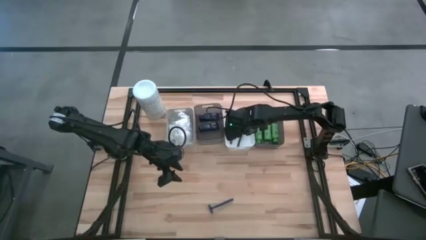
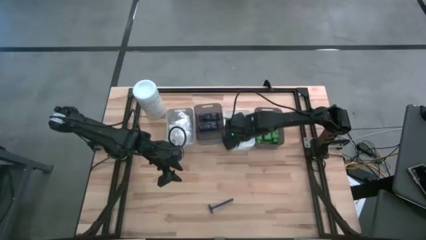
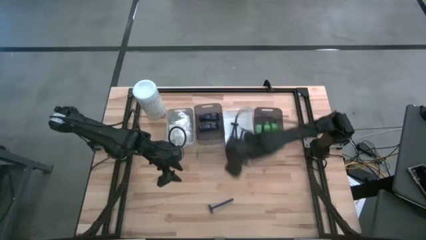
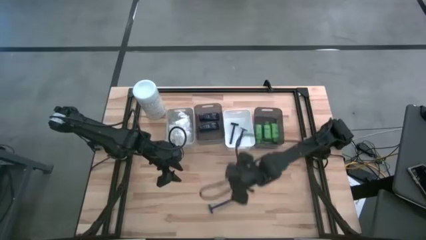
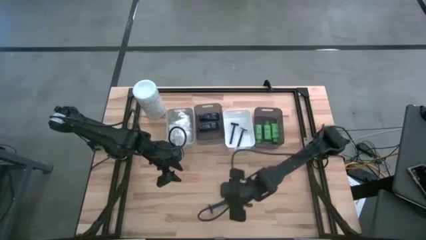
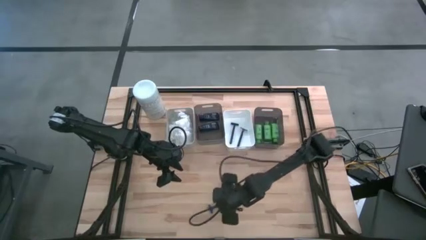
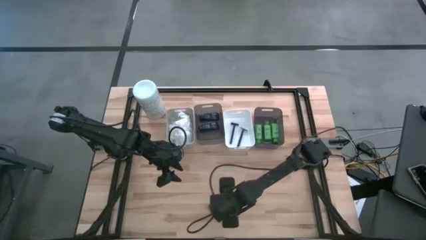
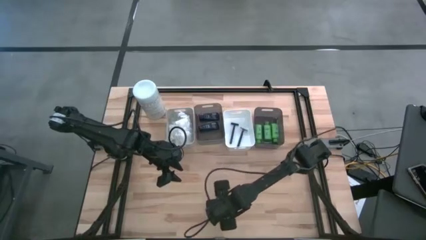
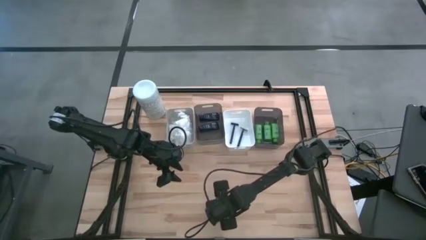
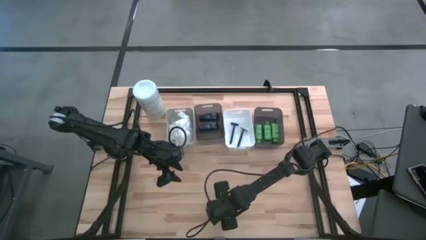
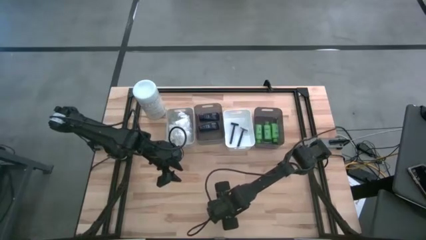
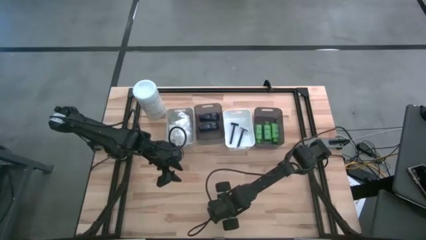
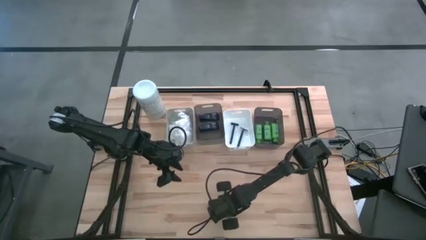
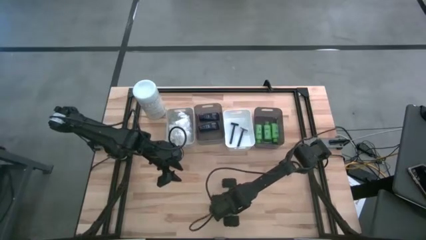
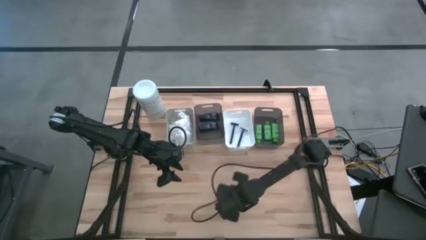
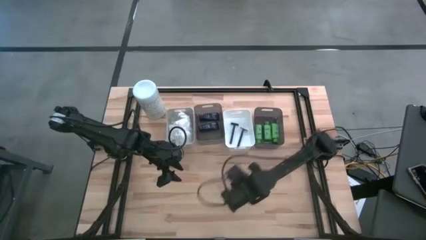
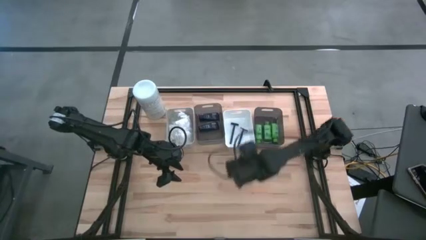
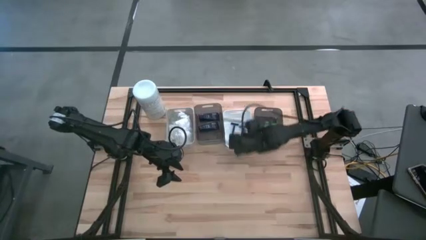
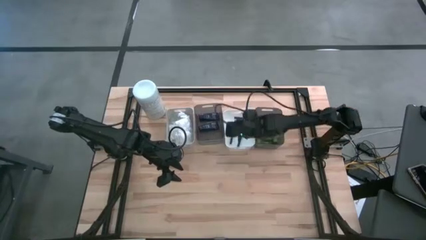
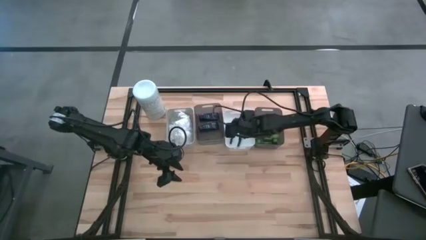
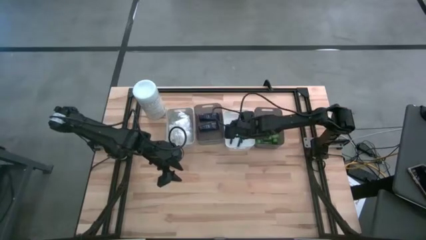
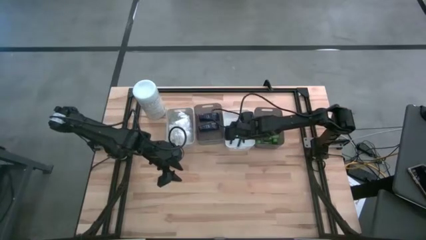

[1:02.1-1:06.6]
Task: Pick & Place Travel size toiletries
Put the razor in the right white bin

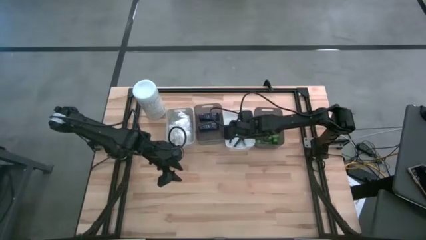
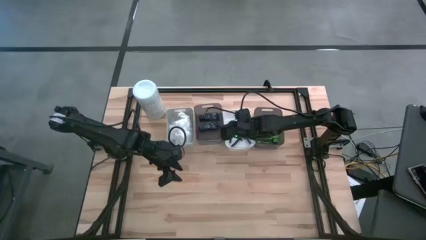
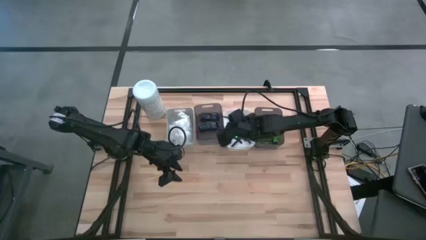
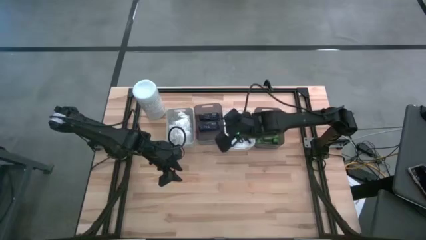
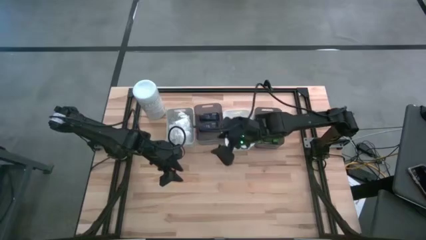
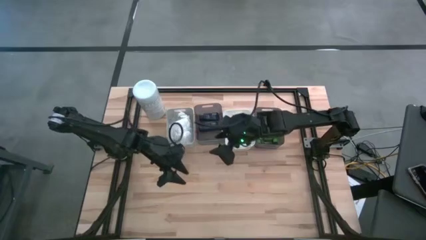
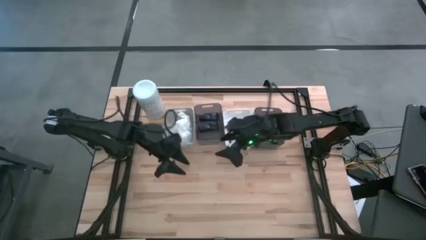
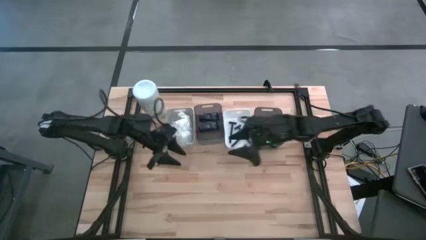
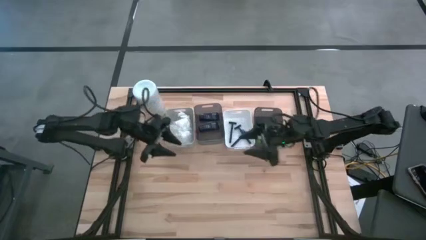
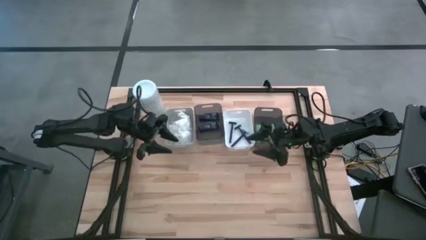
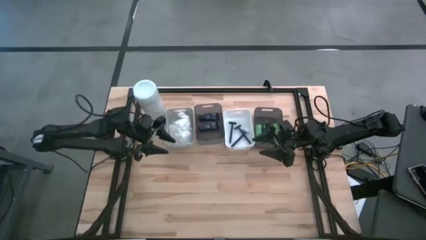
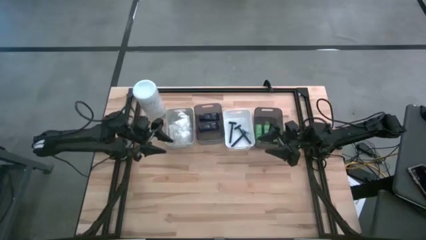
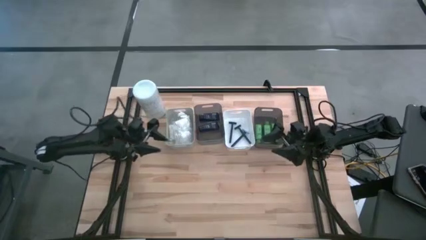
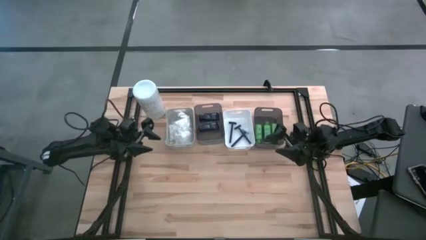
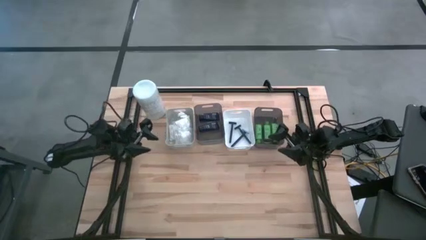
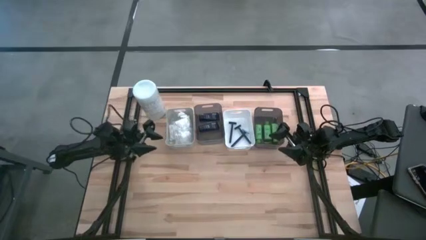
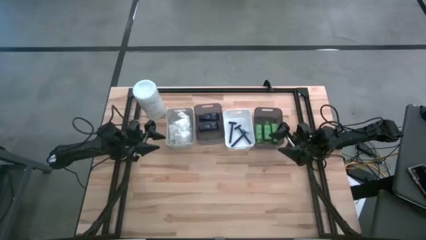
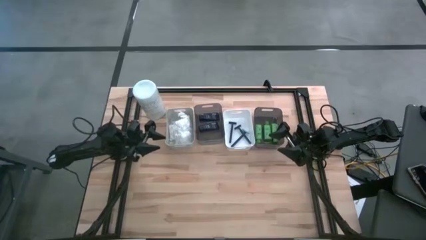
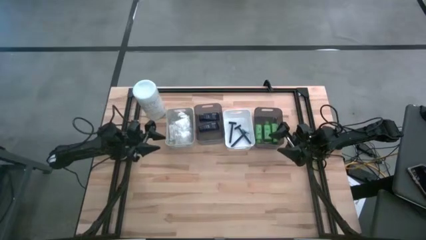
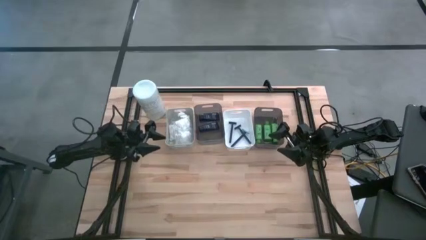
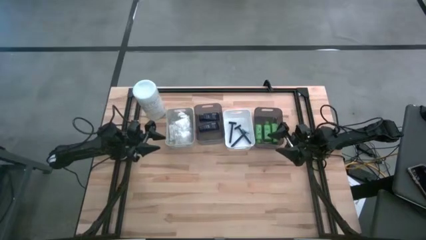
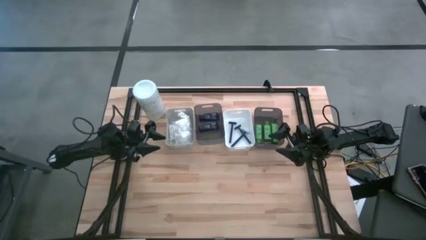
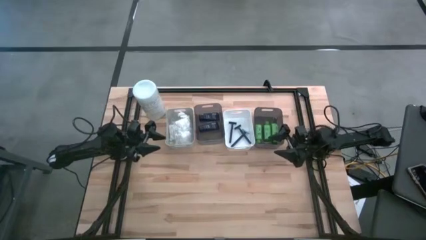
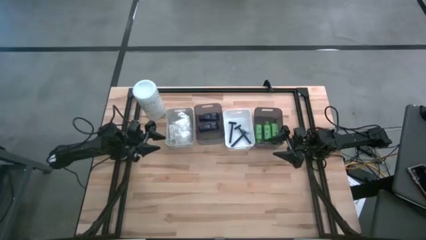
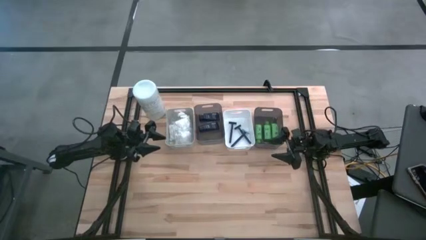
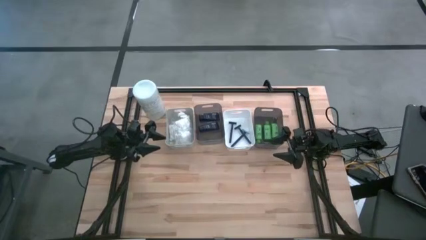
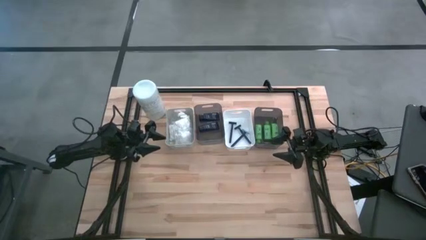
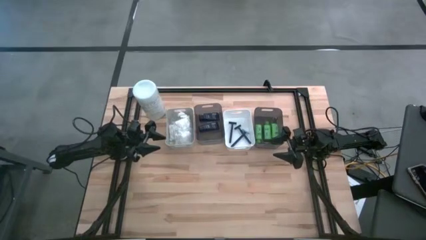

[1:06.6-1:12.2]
Return to Home Position

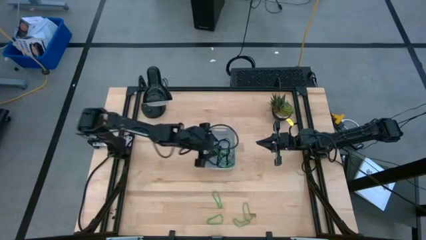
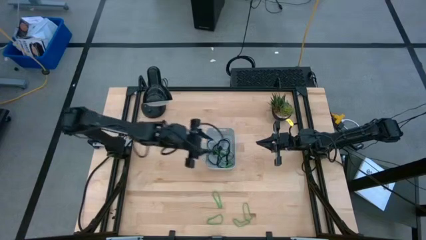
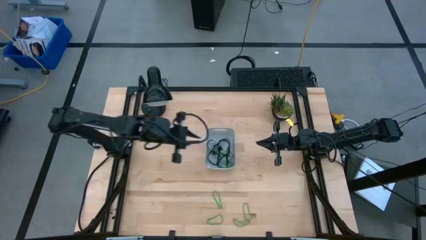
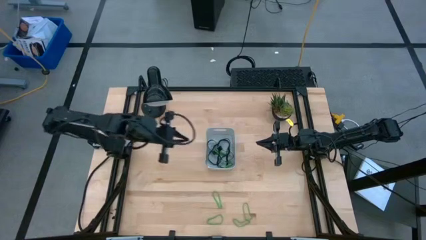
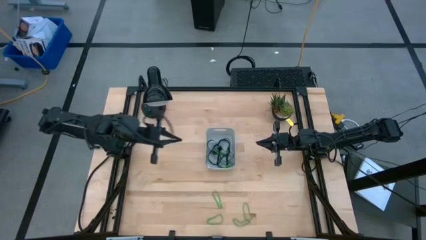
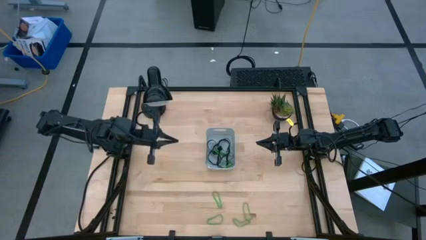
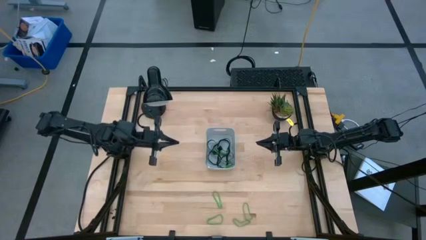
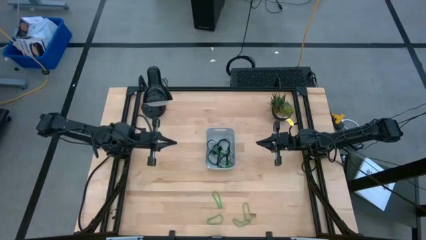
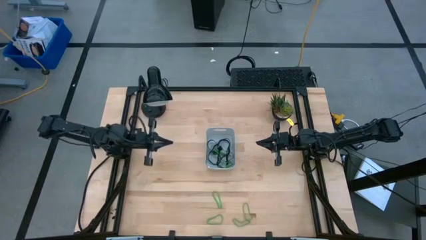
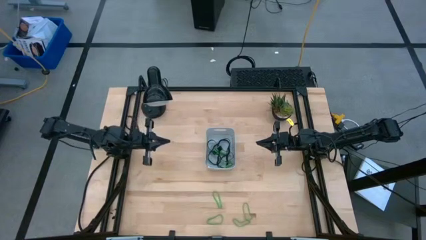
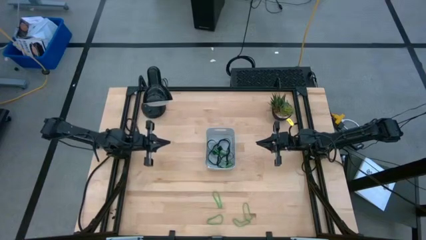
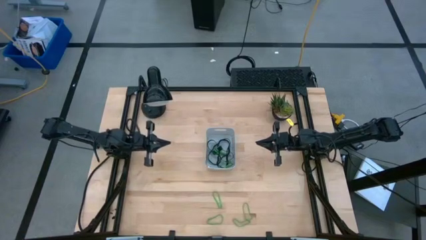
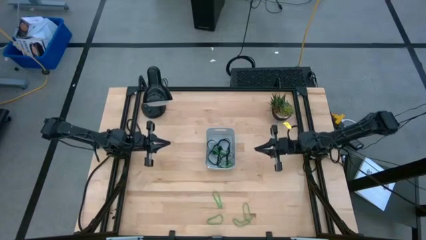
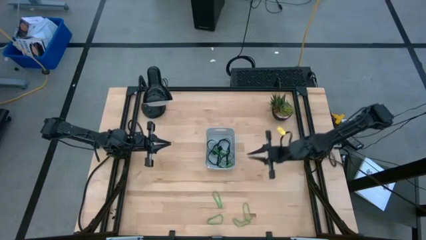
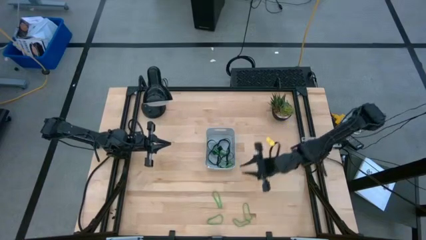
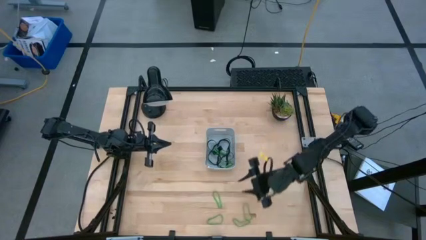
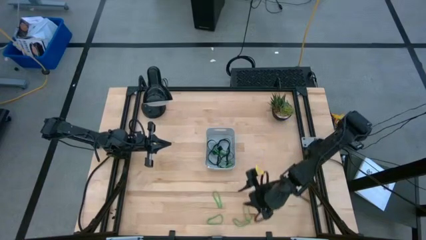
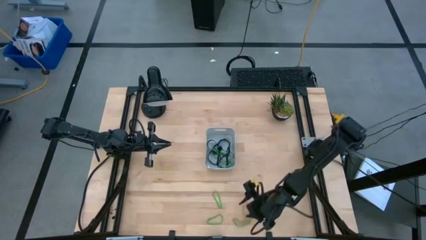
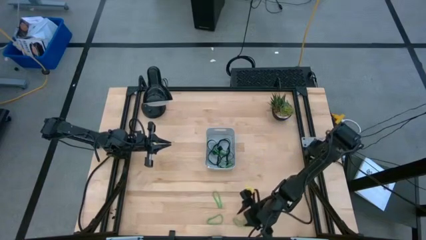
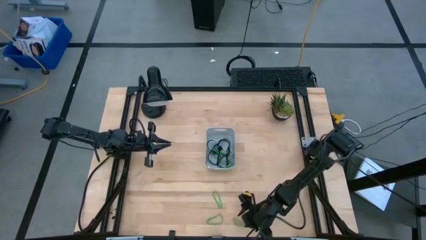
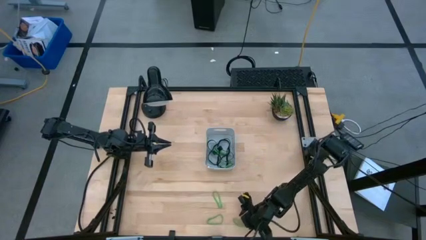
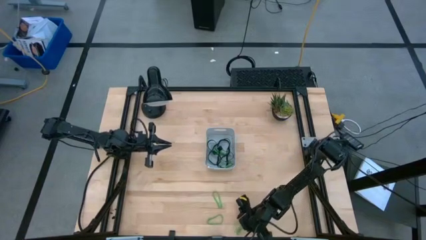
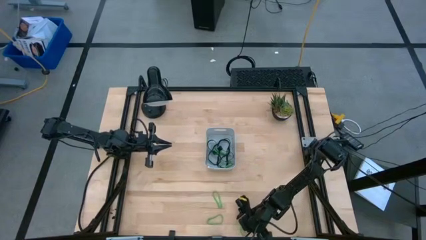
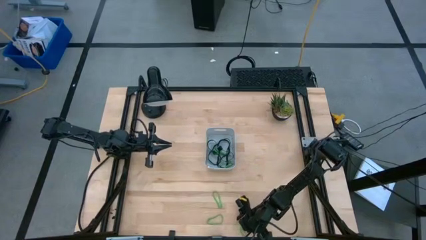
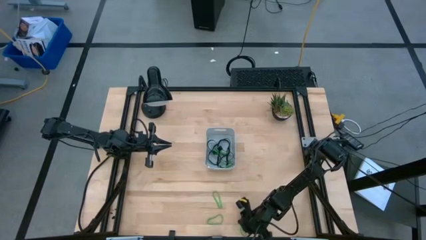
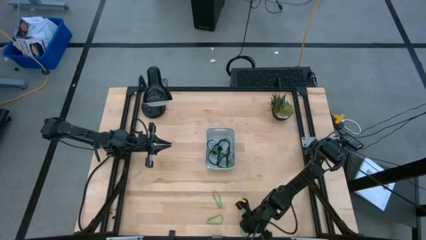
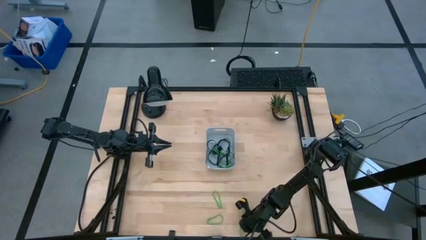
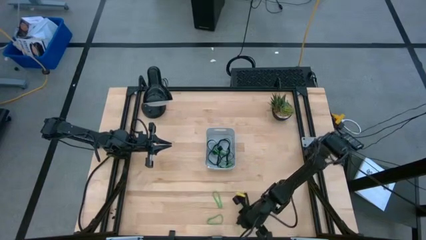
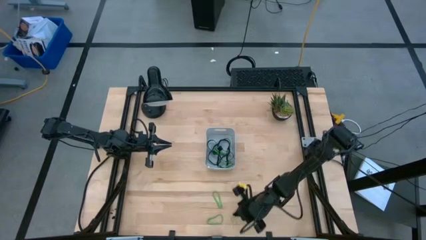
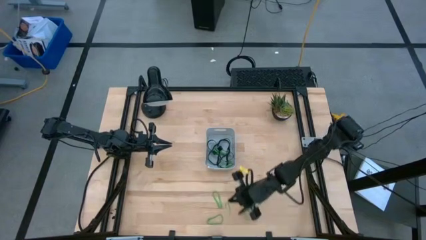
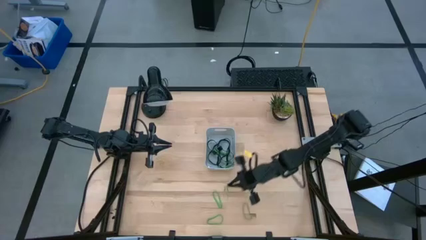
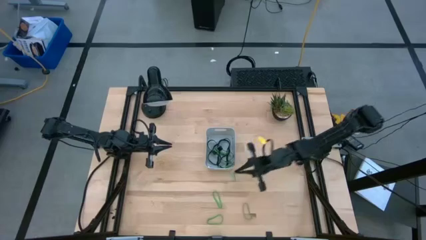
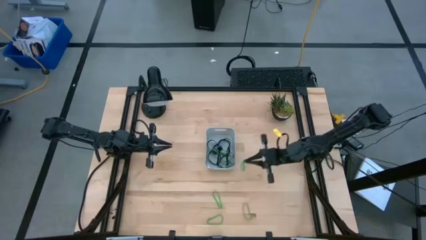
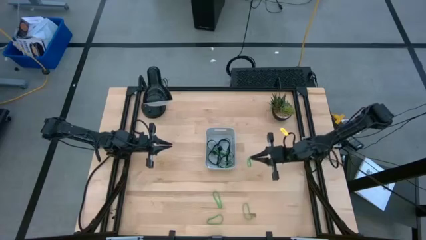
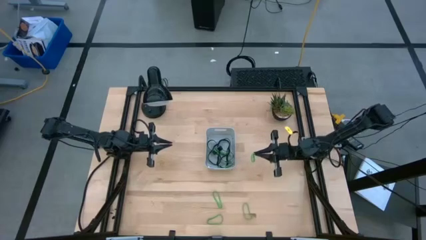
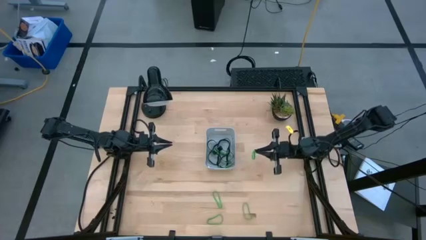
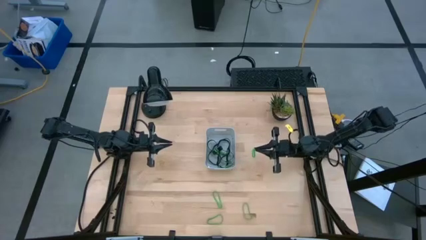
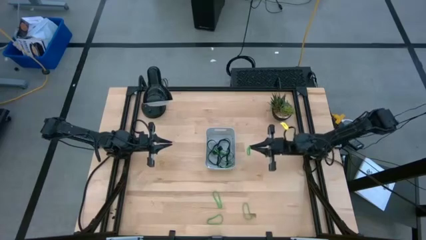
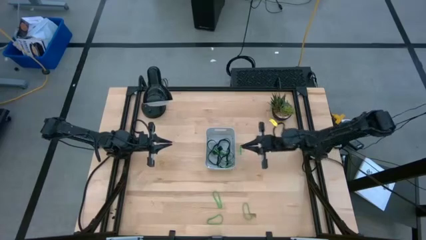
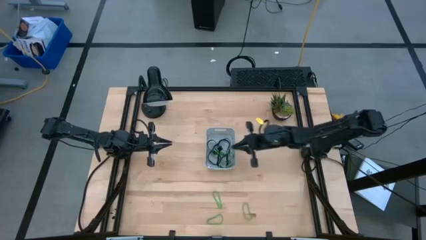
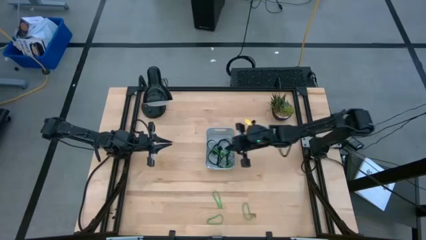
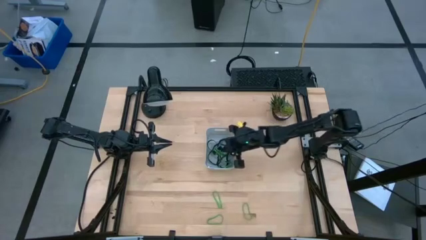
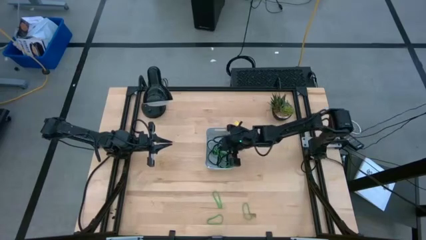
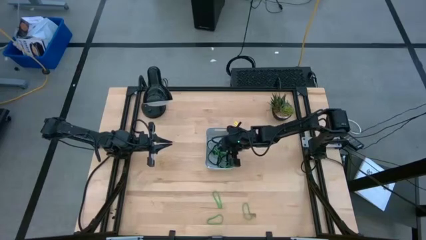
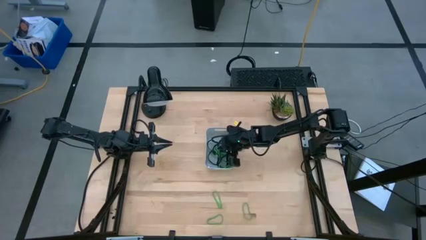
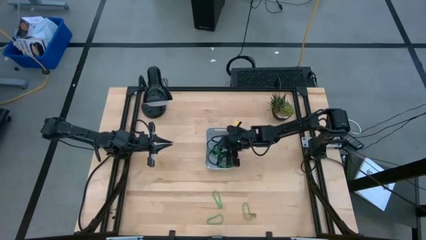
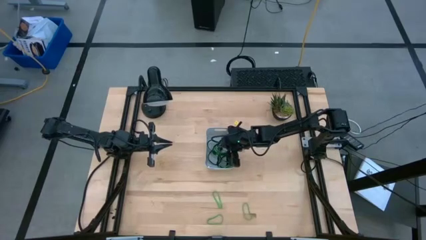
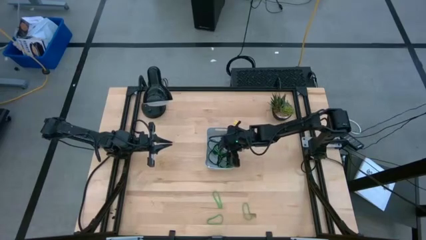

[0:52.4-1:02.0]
Task: Pick and place rubber bands into bin
Put the green rubber band into the gray bin
